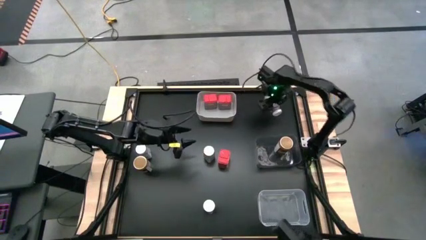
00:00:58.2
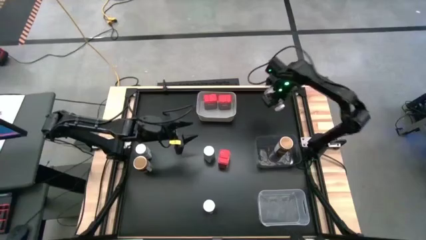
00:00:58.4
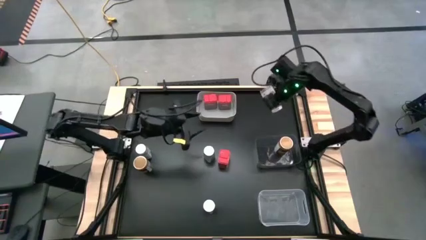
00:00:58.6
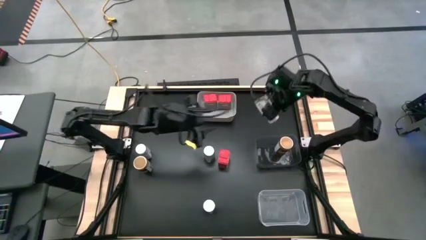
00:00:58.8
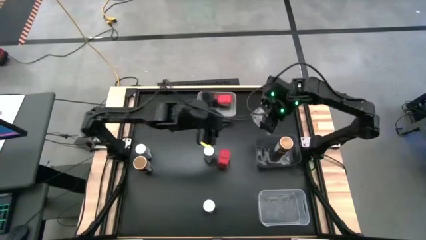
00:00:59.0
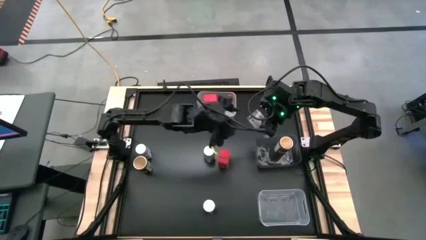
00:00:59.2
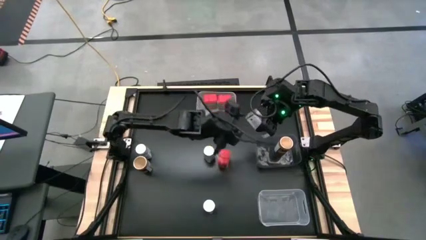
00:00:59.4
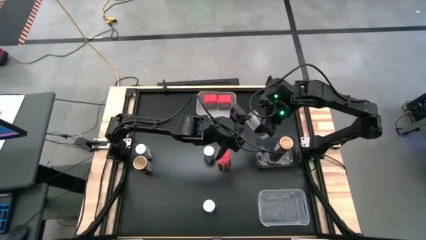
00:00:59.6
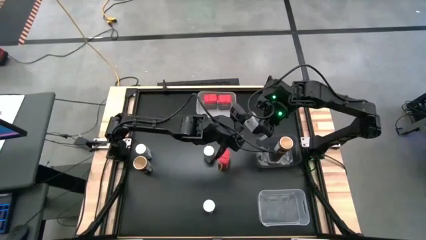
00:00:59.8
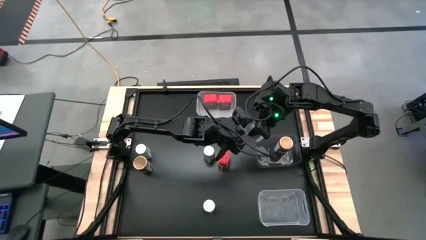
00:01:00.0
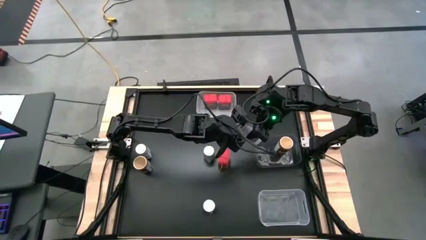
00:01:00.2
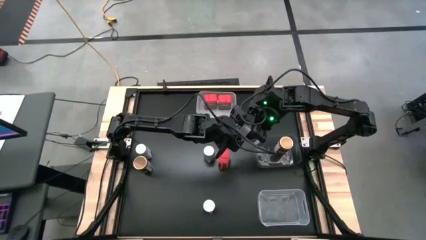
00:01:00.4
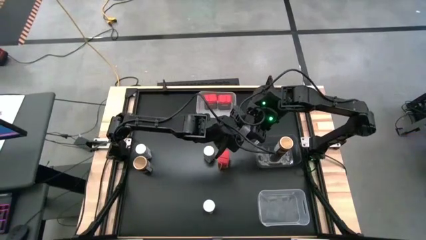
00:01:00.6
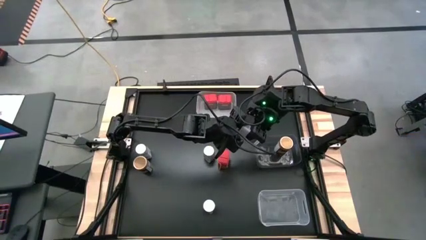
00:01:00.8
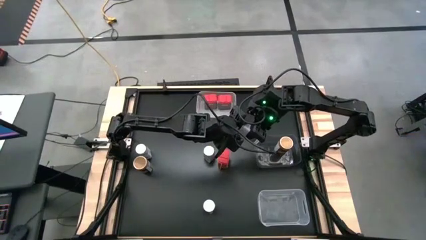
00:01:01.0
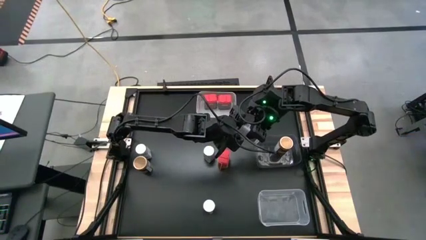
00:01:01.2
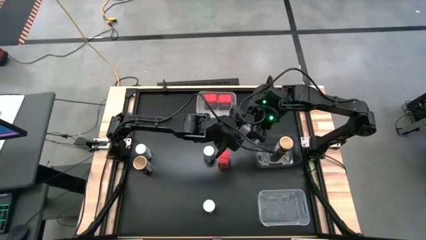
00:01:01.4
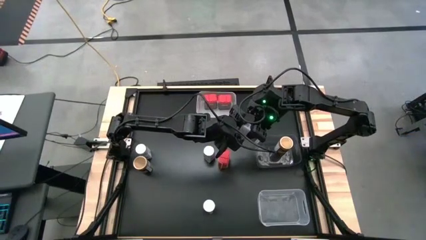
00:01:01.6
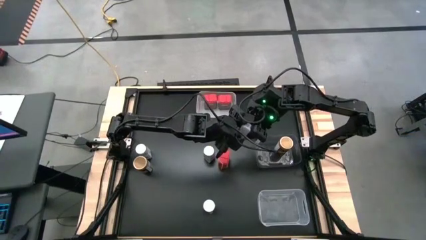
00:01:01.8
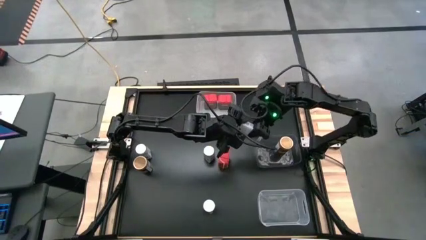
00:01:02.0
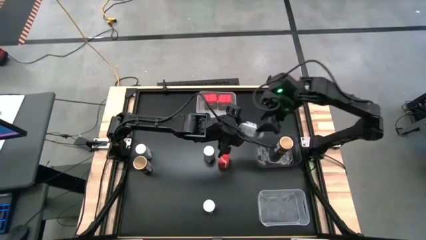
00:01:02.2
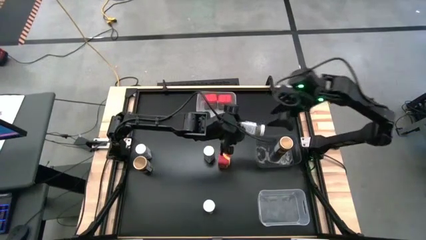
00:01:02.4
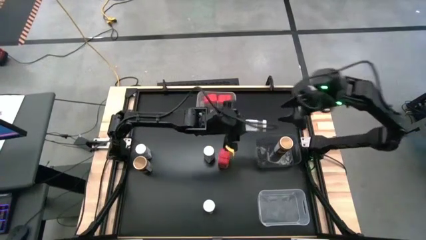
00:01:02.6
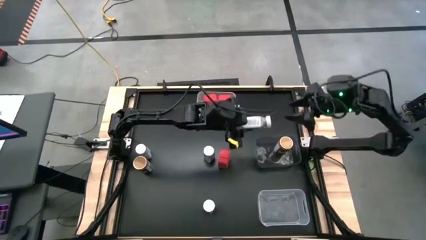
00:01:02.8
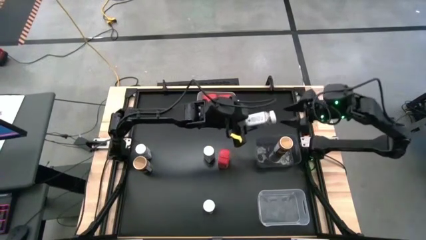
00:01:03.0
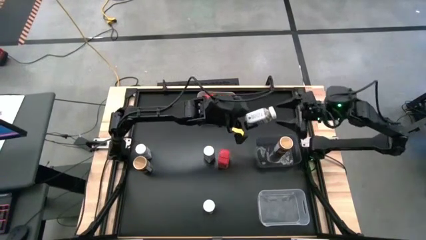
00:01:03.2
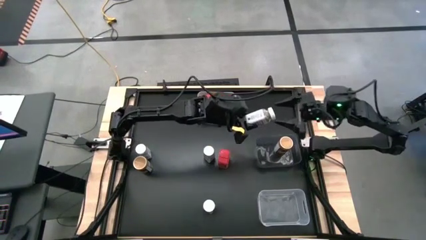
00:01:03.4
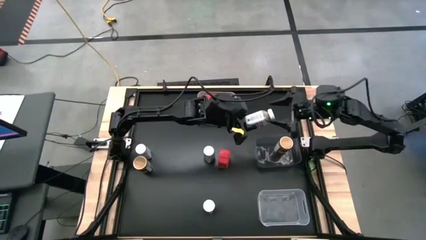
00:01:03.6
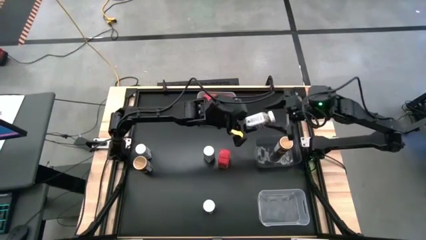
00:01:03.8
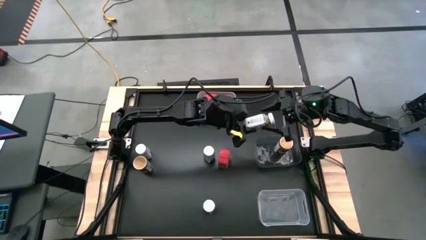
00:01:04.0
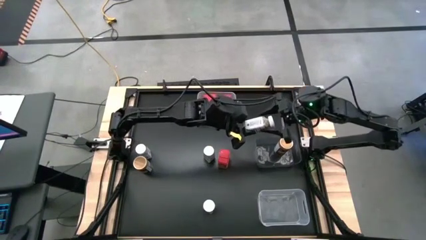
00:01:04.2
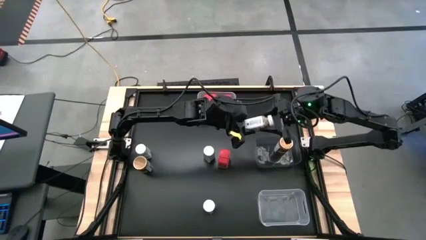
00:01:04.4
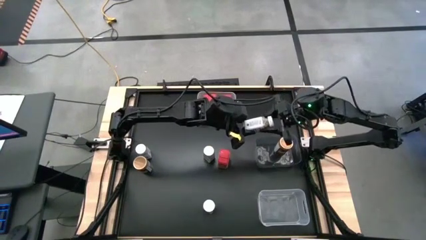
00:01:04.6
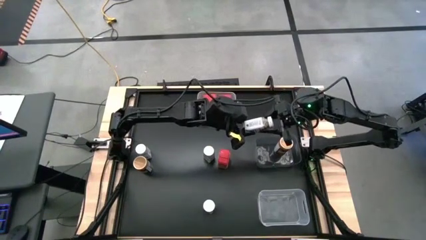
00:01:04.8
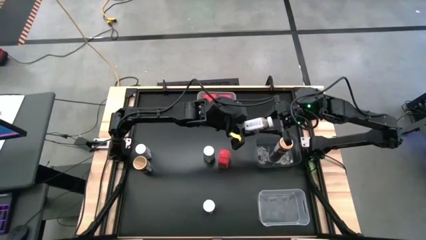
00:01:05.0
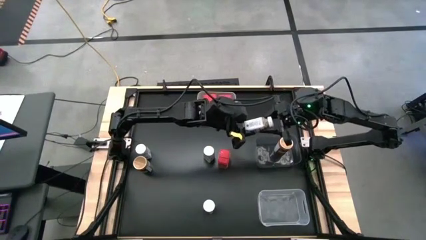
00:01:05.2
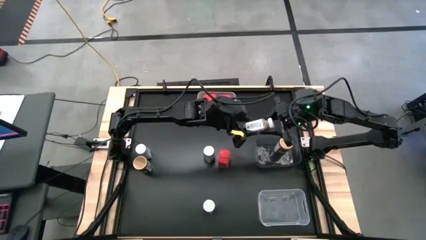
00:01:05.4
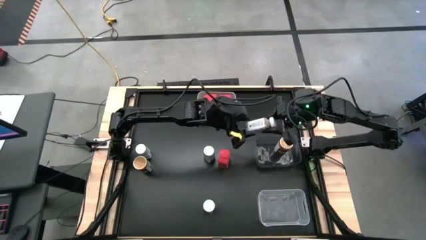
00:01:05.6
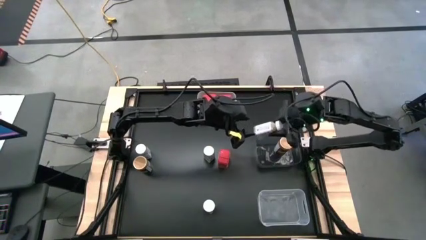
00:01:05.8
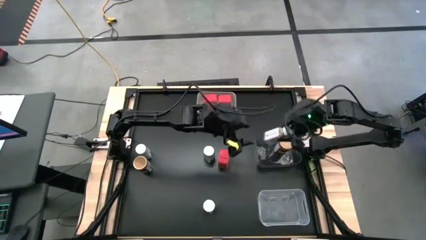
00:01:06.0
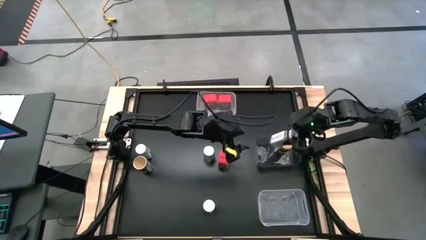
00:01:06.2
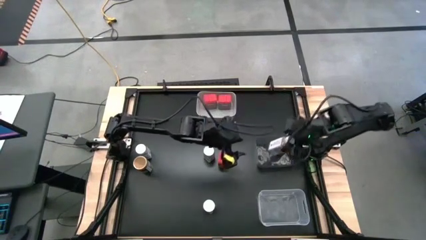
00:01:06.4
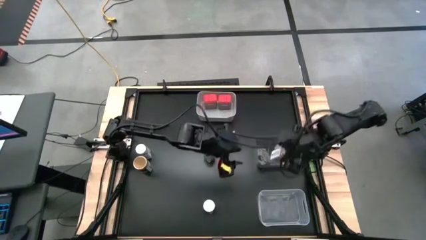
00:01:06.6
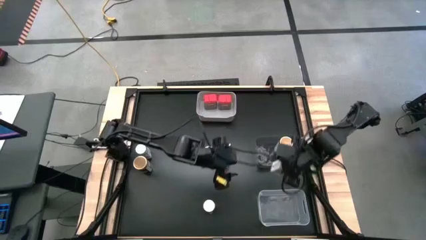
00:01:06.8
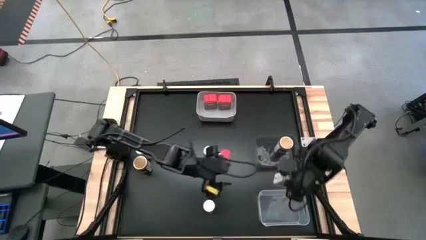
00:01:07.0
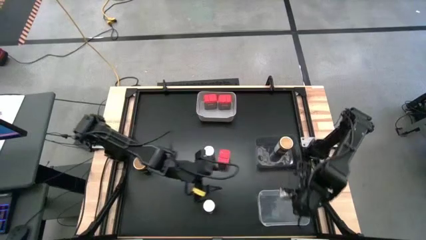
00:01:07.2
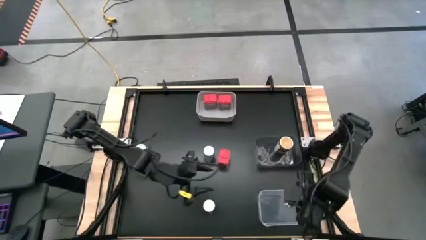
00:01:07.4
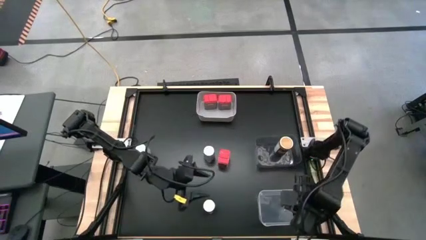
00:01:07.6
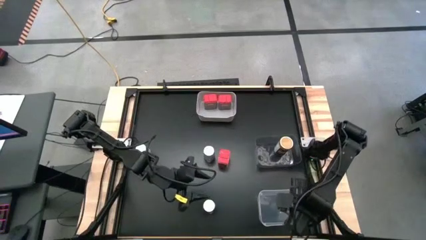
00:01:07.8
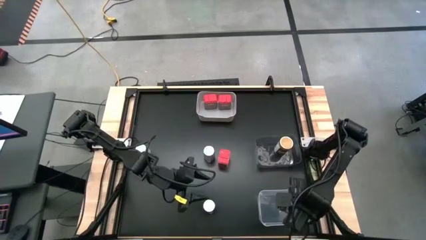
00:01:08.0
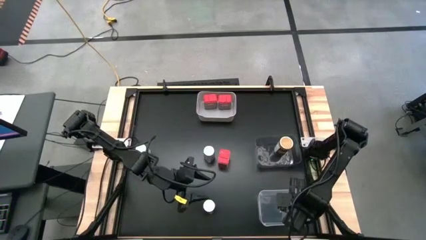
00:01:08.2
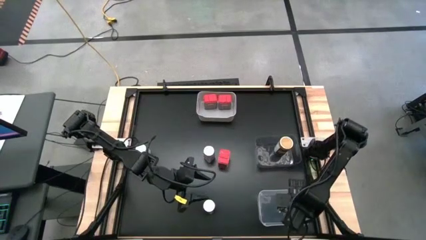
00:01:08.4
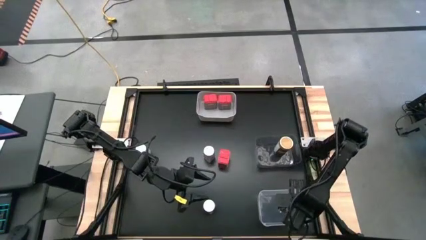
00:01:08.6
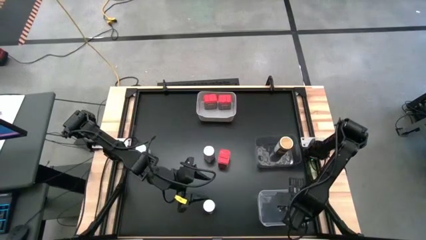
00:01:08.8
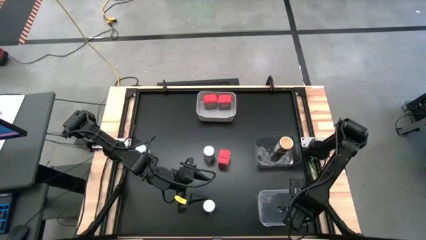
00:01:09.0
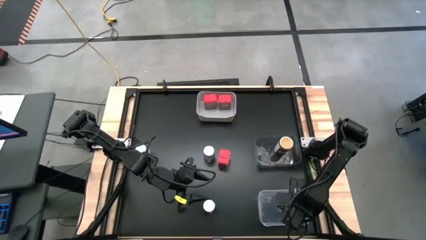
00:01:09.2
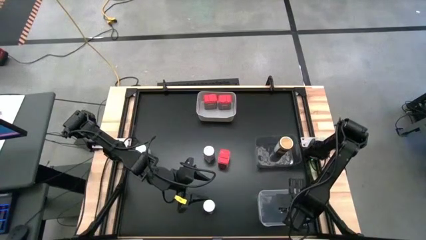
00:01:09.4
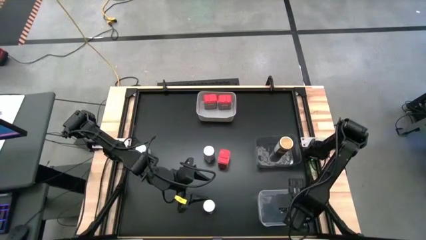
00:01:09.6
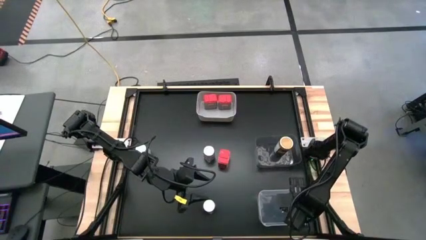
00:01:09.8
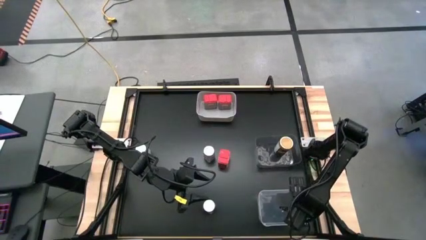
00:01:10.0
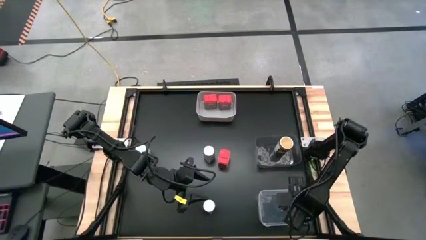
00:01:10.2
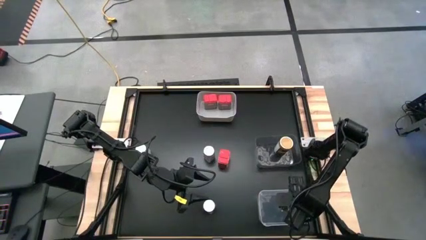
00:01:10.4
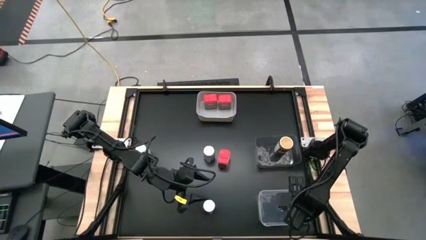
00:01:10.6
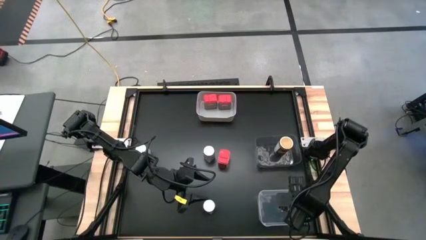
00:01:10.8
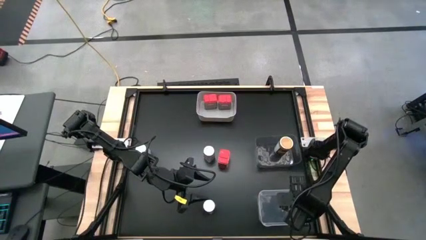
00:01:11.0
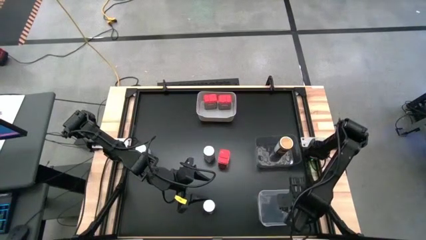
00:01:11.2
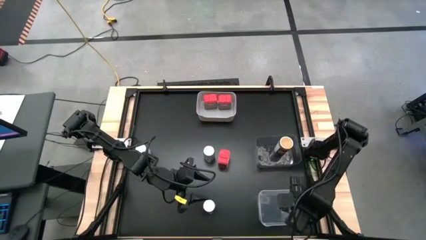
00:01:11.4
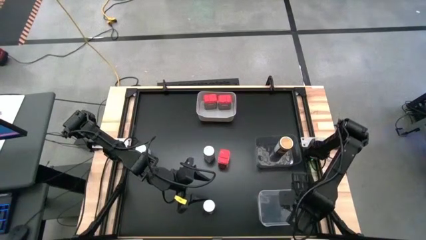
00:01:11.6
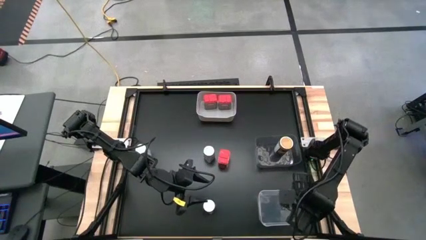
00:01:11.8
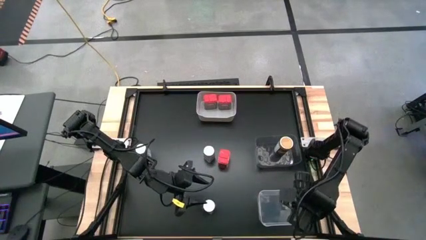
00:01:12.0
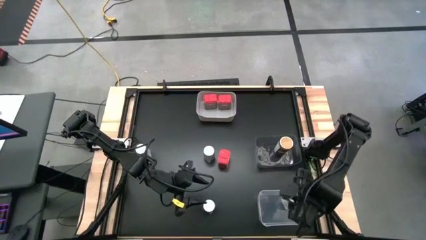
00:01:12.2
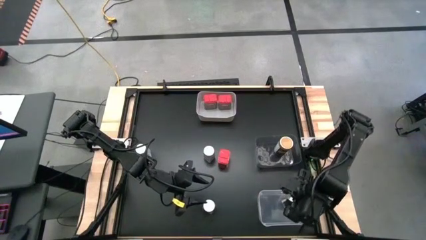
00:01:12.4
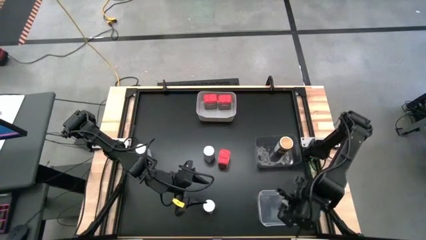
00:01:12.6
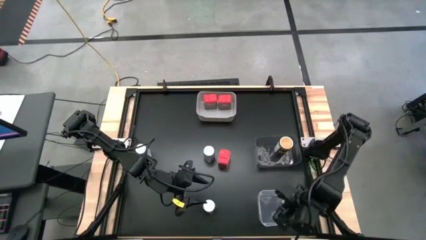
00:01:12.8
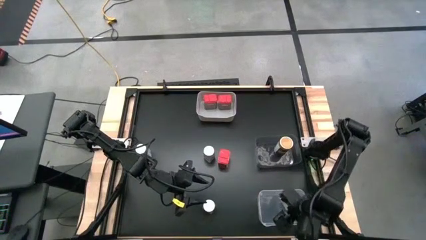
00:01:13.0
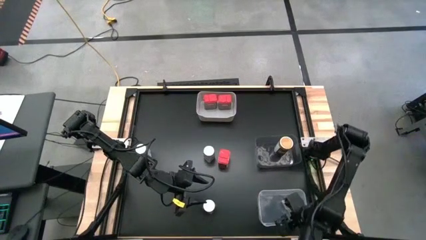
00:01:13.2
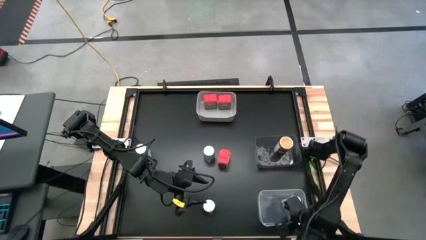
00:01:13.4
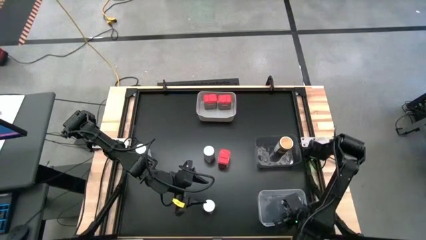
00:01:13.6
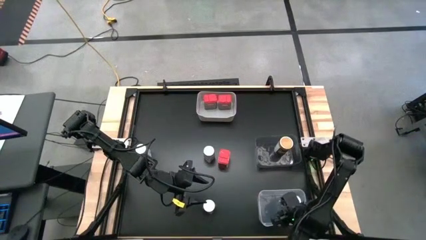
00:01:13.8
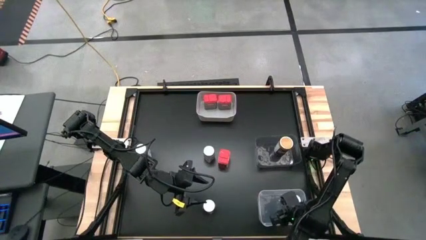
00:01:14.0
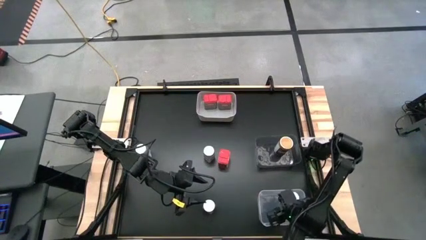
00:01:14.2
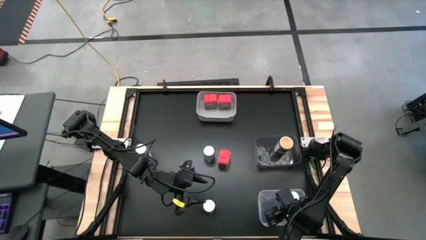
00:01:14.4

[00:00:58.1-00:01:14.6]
Task: Sort spices by type
Put the top right white seasoning bottle into the transparent bin

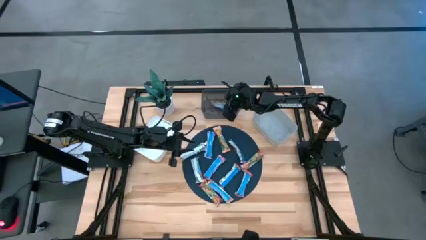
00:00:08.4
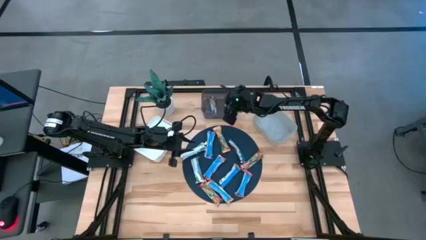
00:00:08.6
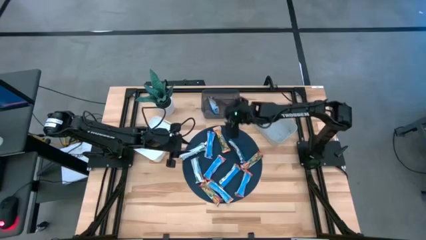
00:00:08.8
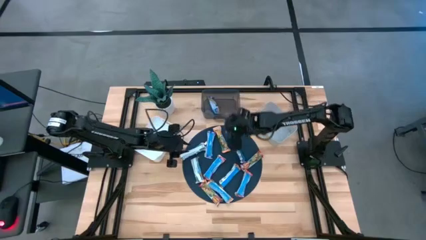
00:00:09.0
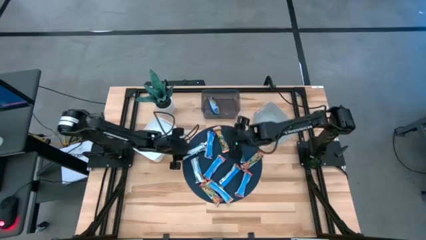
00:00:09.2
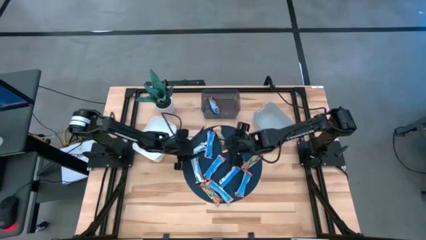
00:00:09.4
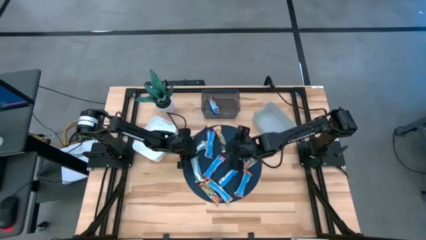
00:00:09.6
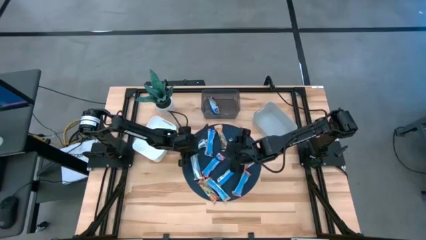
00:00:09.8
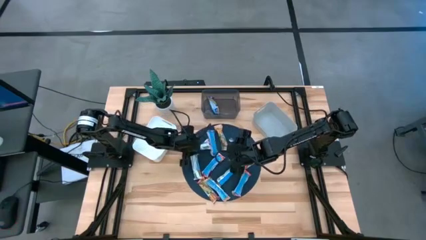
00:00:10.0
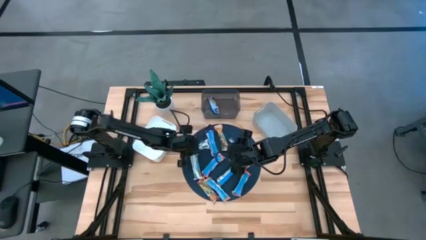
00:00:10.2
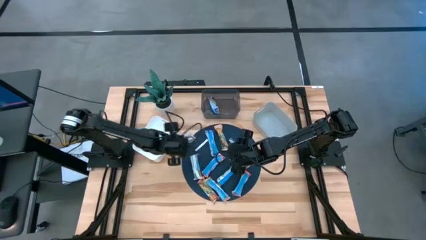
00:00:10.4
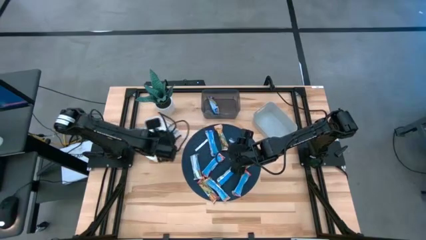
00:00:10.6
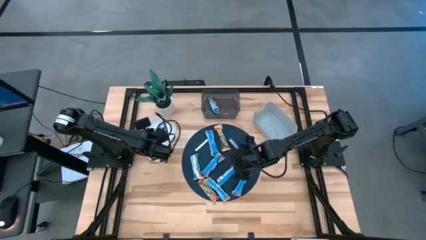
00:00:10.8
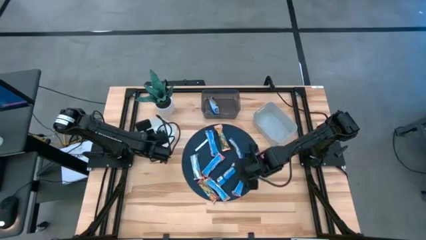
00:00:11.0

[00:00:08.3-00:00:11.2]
Task: Pick and place Granola Bars by type
Put the yellow granola bar into the white bin
